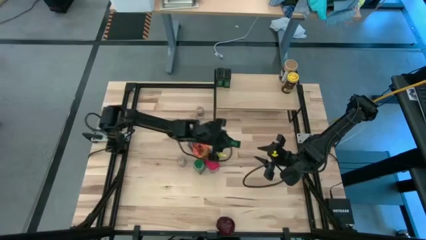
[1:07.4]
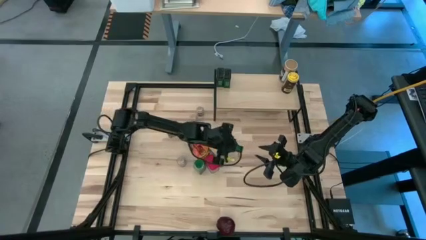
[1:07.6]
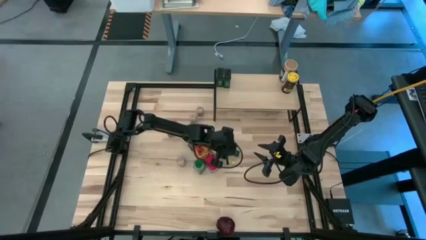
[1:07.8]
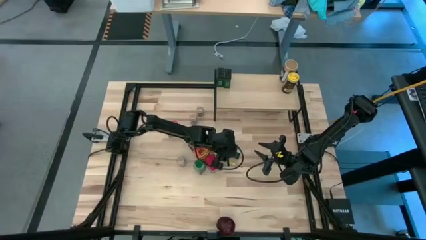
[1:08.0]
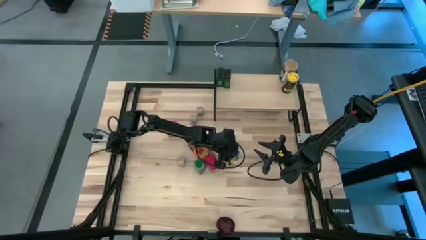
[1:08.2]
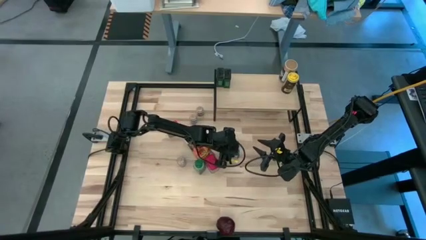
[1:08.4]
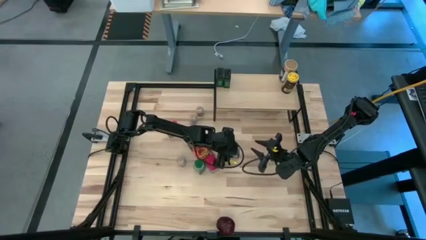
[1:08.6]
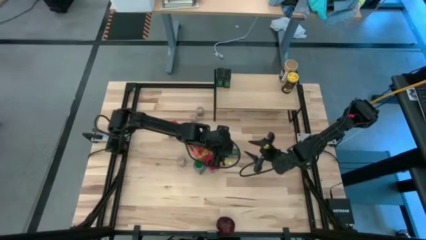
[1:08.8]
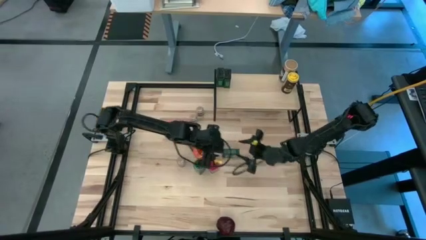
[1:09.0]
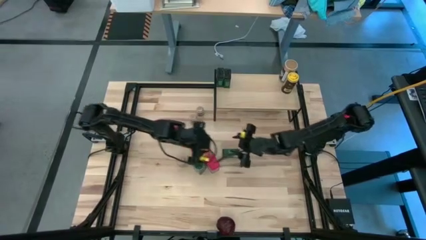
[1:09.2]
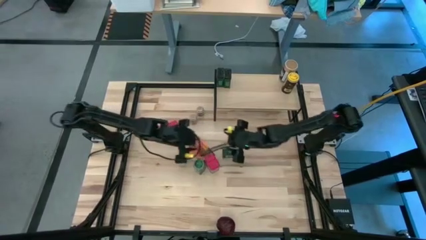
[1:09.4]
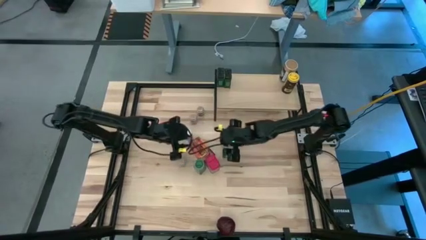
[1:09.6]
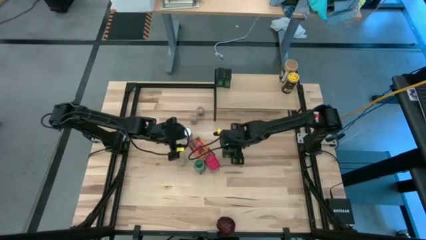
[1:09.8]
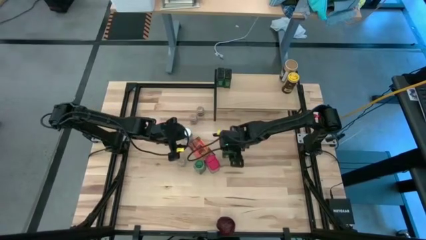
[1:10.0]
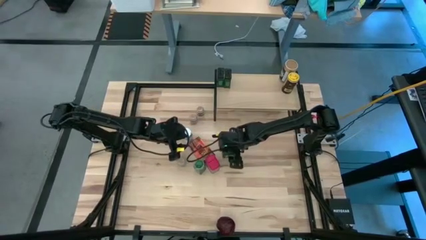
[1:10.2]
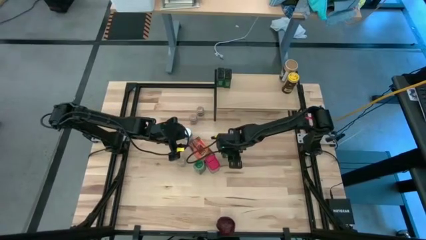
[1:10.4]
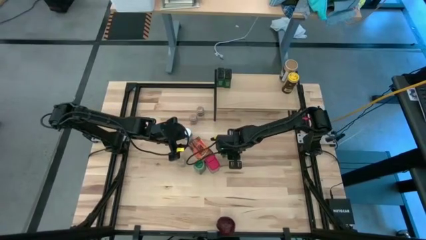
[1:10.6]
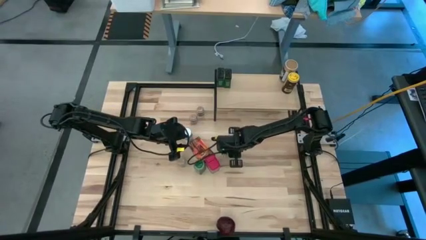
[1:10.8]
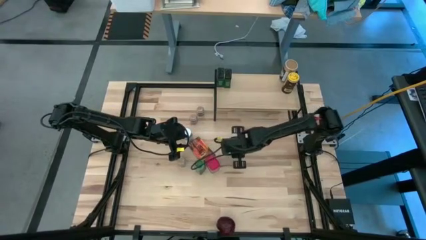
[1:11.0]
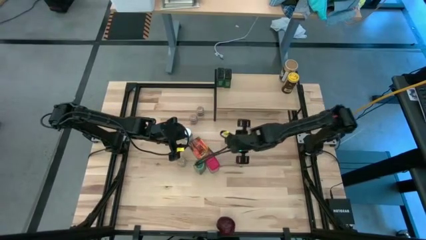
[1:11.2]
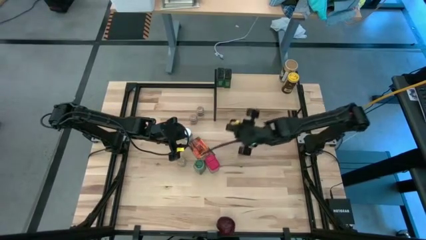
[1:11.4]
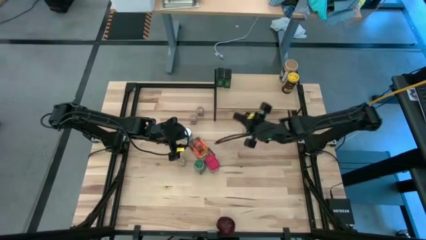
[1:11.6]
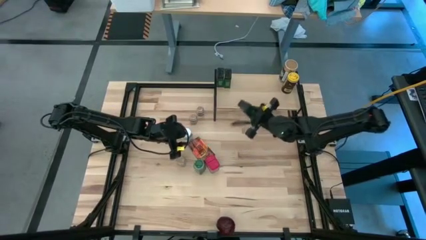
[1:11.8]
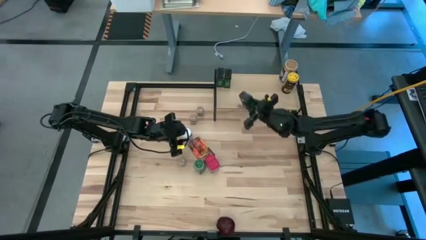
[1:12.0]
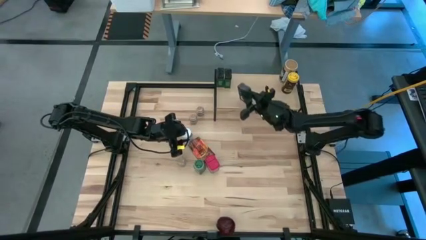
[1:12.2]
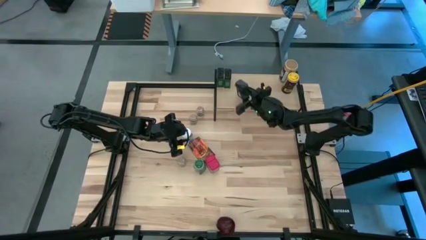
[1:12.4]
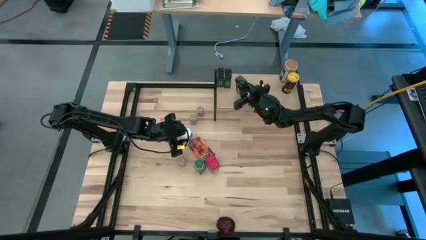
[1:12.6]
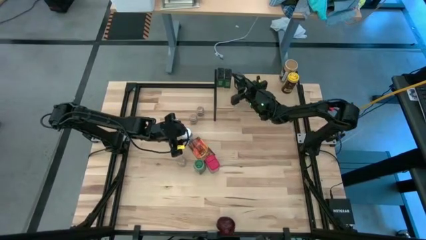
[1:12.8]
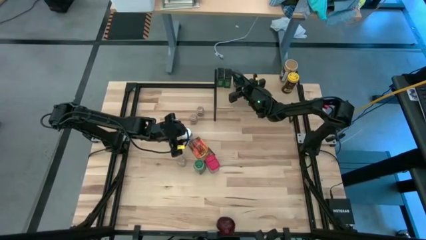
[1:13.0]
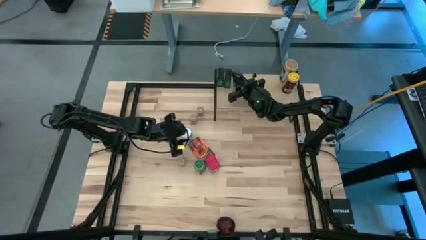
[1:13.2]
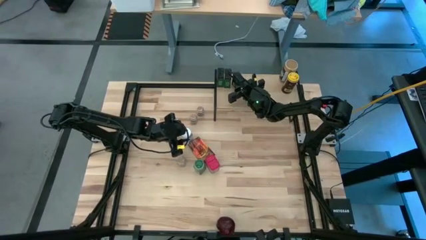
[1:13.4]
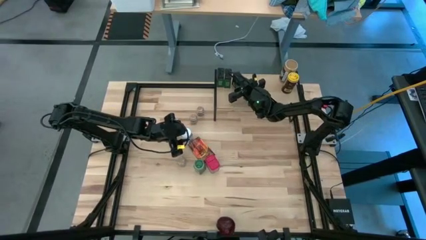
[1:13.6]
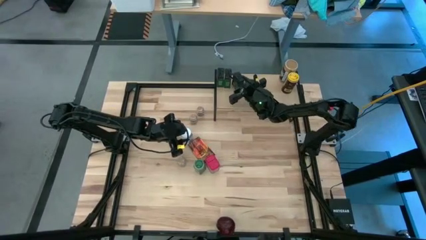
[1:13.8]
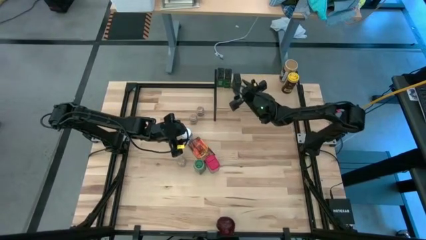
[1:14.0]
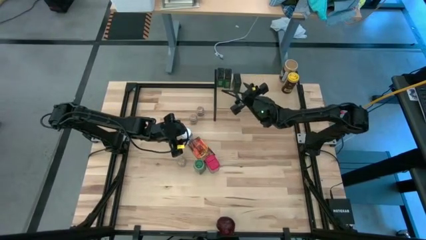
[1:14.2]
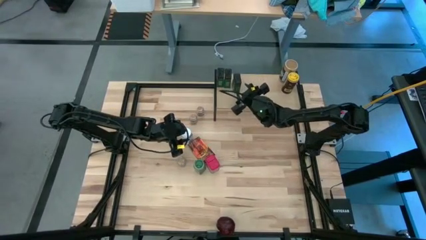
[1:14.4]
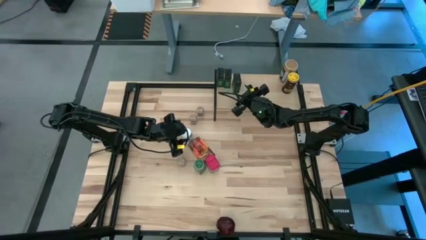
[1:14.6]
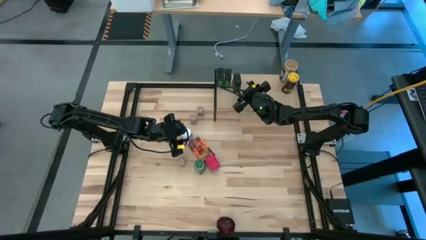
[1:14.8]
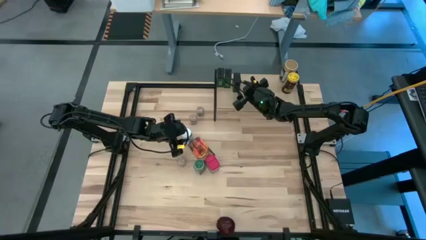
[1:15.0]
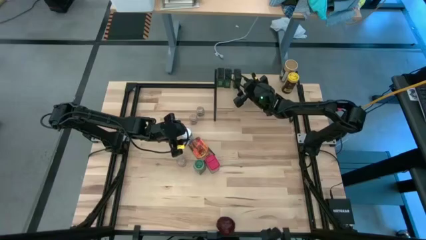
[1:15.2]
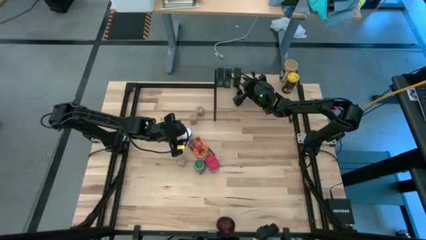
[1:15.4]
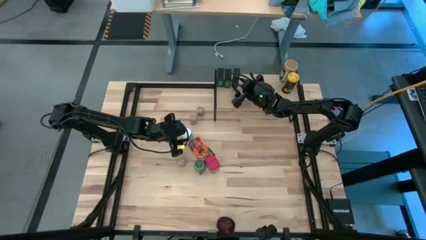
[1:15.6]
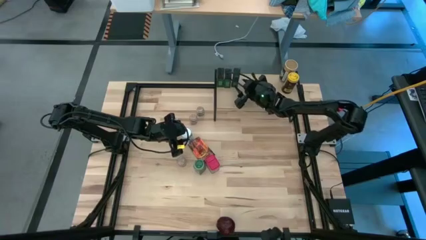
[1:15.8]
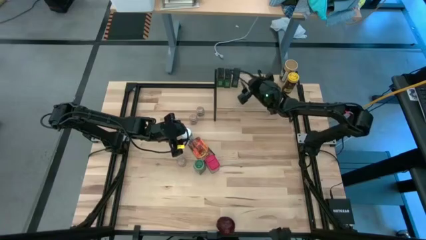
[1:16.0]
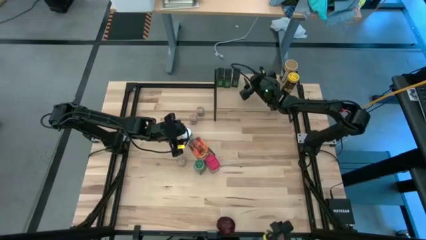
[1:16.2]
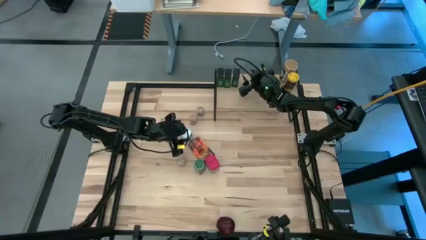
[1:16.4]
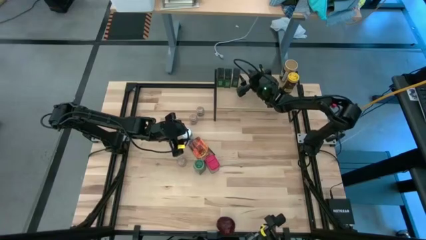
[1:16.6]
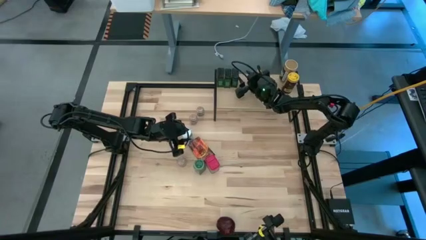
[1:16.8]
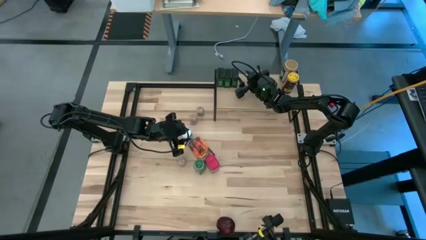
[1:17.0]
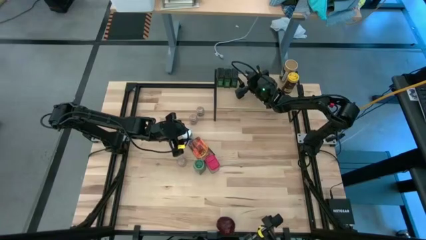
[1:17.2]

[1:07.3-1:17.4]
Task: Shelf spices
Put the green seasoning can on the shelf

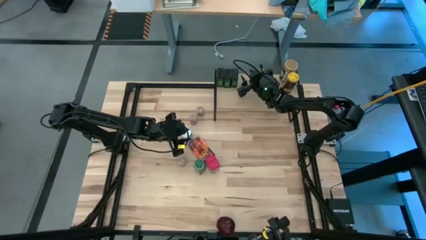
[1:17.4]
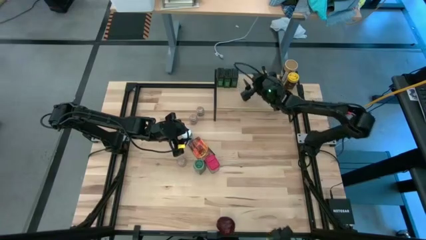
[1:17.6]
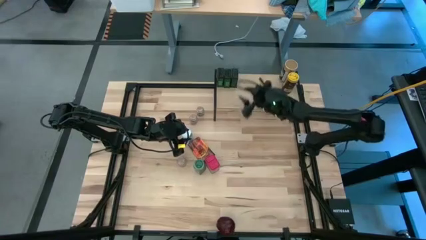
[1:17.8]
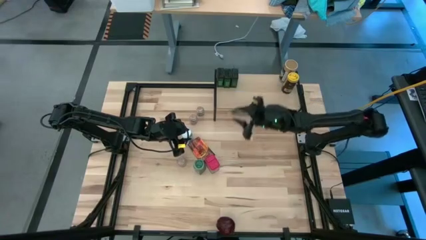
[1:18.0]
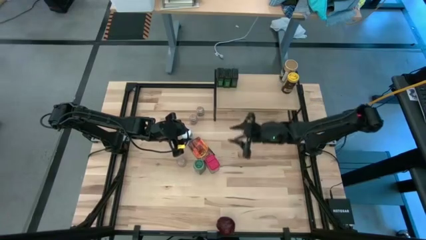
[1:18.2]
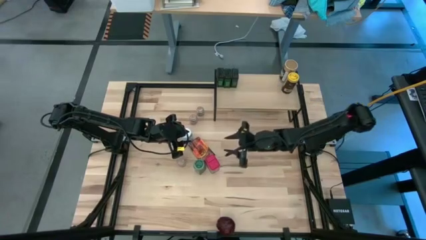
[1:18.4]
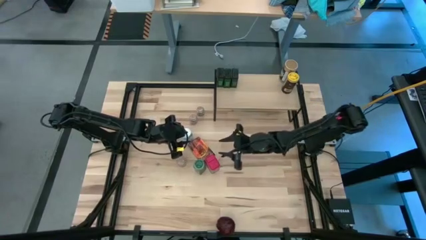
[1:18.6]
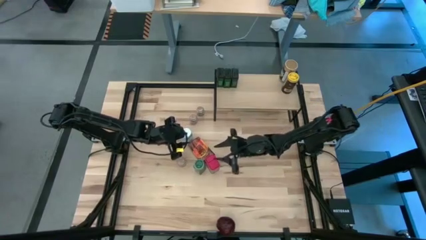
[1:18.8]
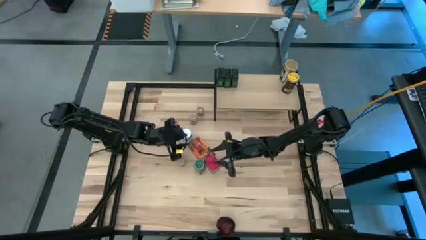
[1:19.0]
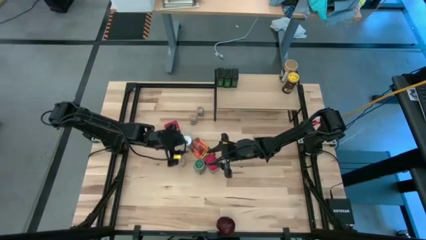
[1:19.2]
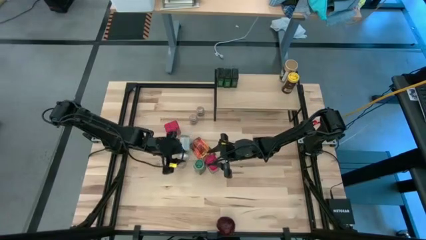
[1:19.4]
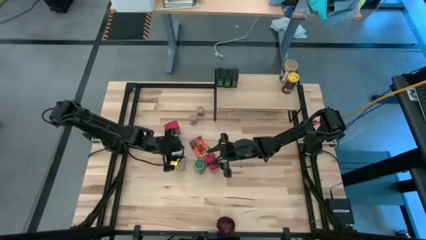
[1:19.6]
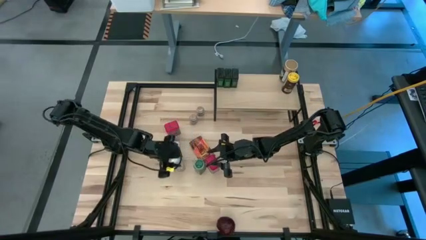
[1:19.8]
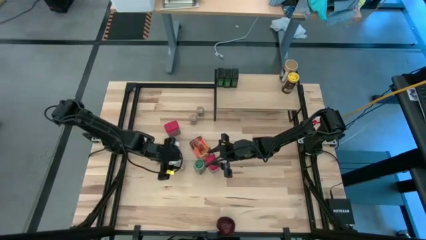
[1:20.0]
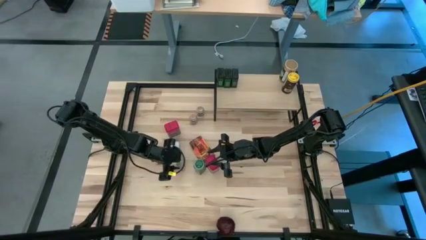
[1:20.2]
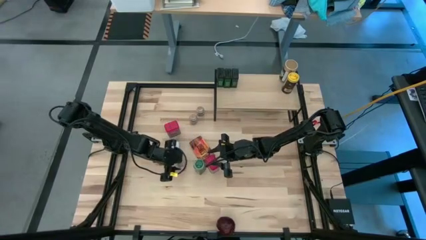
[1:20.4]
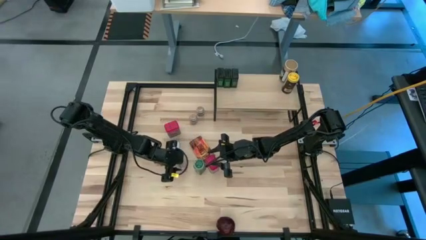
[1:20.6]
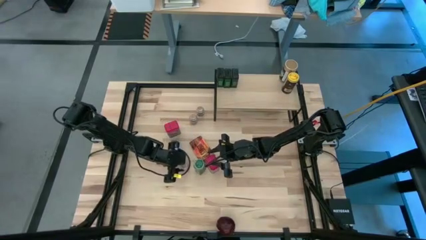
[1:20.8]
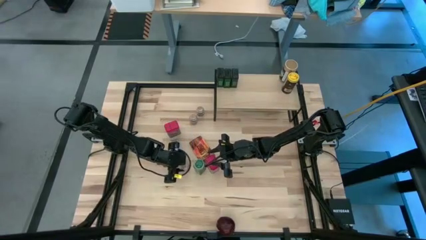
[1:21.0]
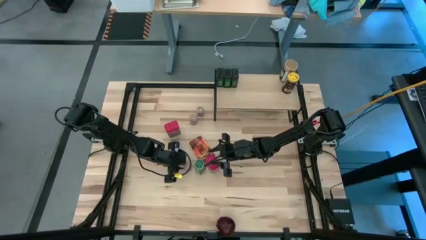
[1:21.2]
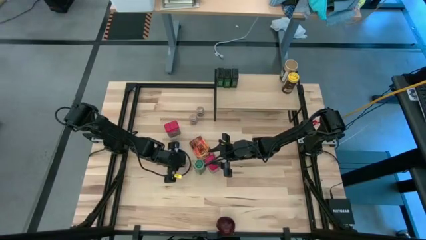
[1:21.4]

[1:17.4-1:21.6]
Put the bottom transparent seasoning bottle on the shelf
